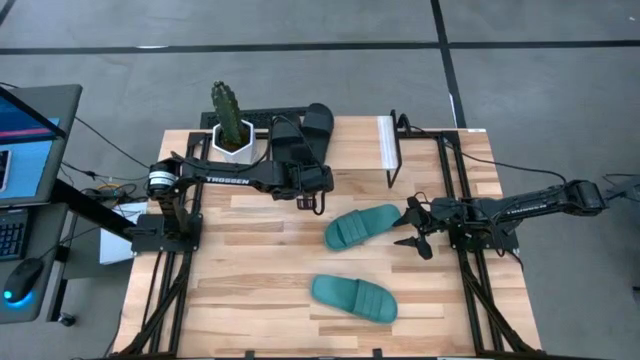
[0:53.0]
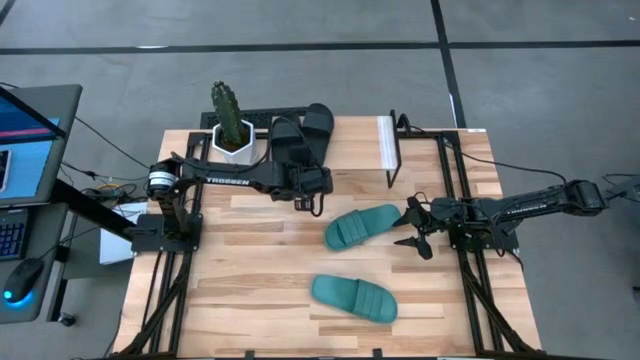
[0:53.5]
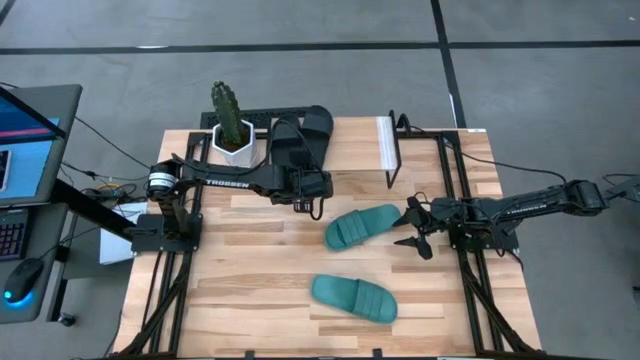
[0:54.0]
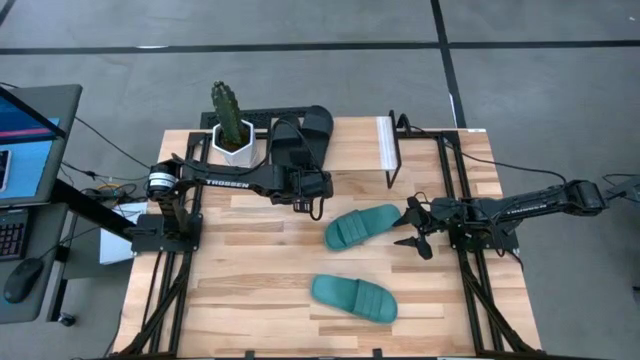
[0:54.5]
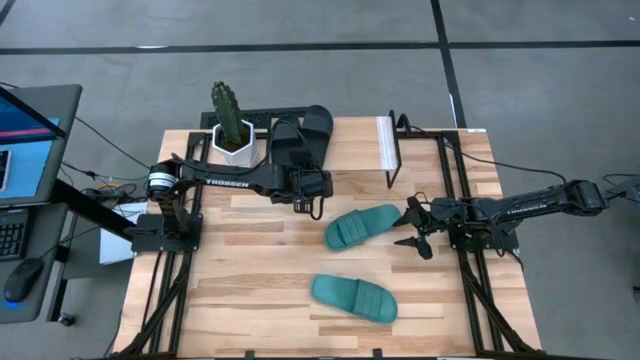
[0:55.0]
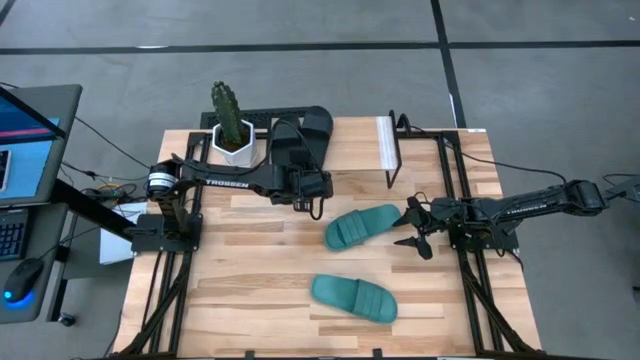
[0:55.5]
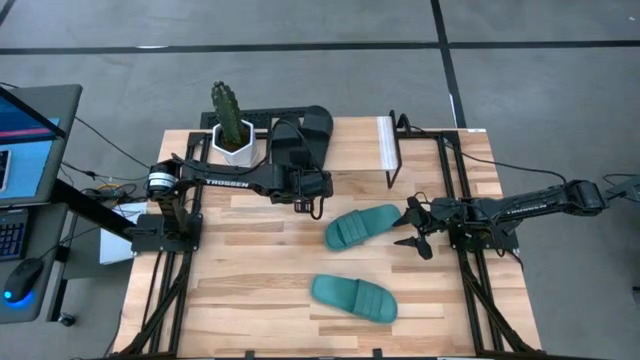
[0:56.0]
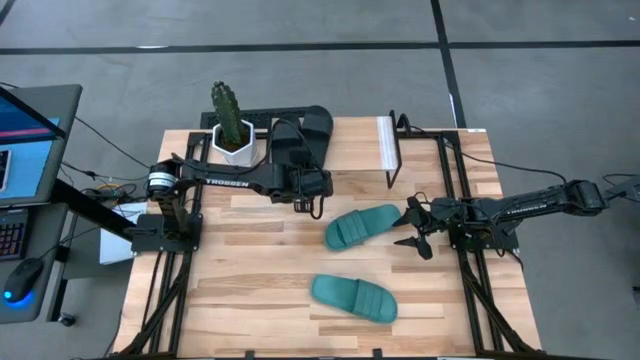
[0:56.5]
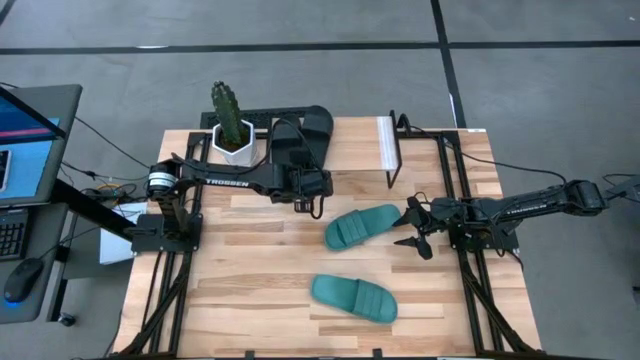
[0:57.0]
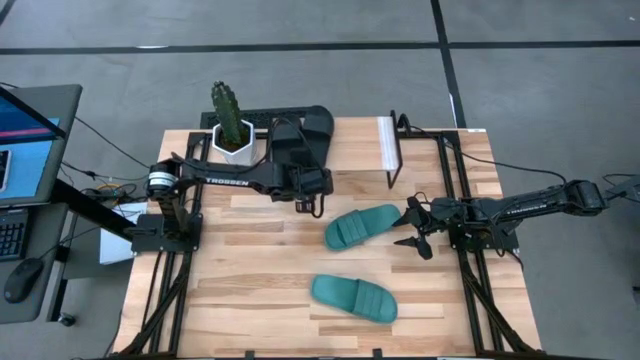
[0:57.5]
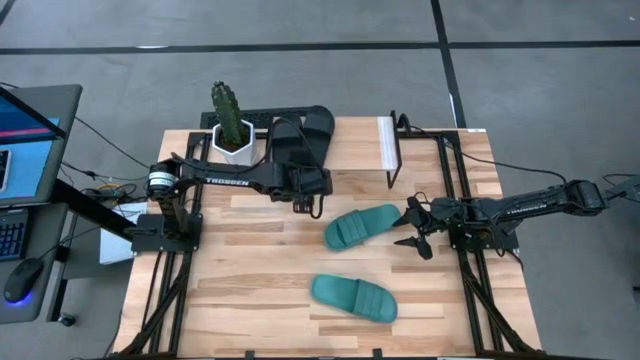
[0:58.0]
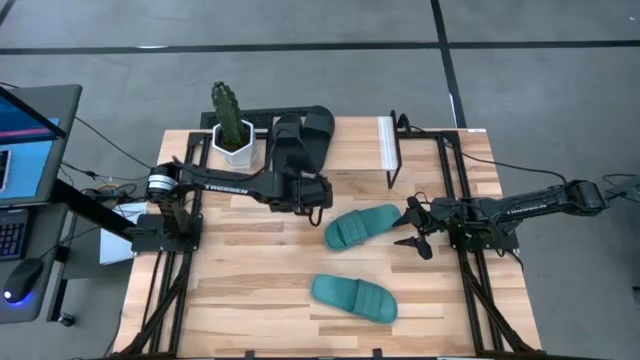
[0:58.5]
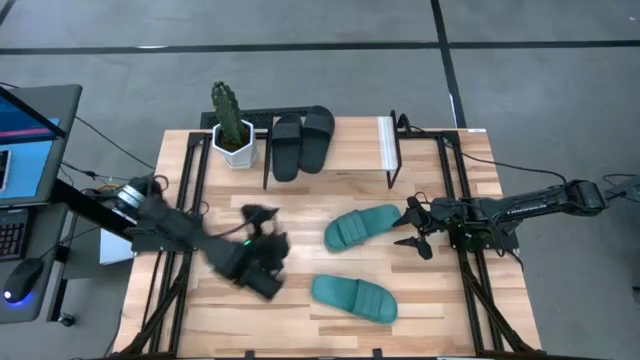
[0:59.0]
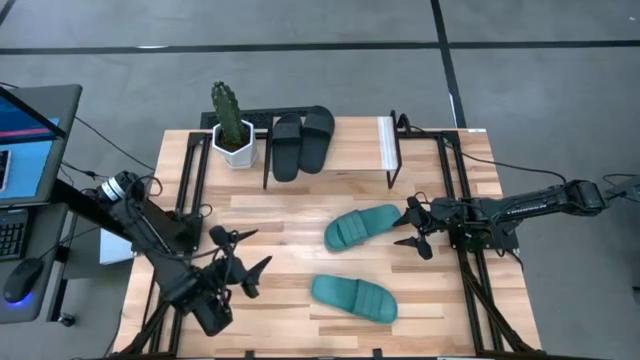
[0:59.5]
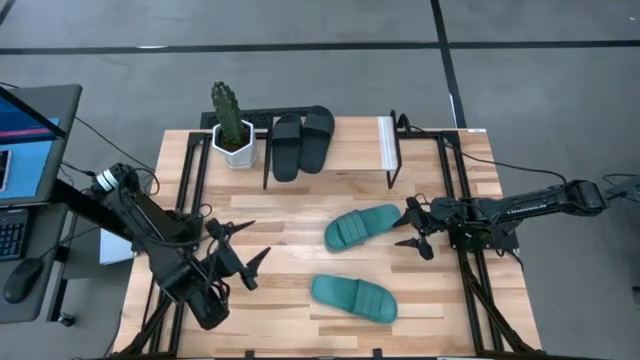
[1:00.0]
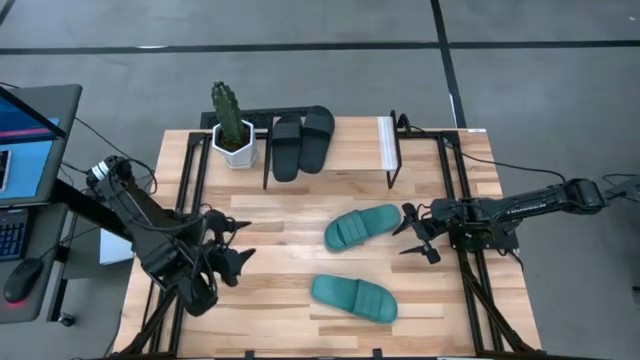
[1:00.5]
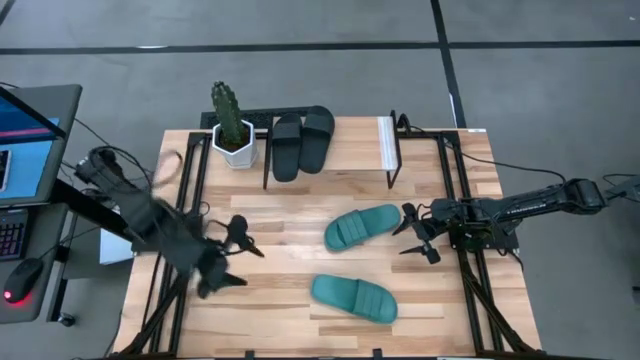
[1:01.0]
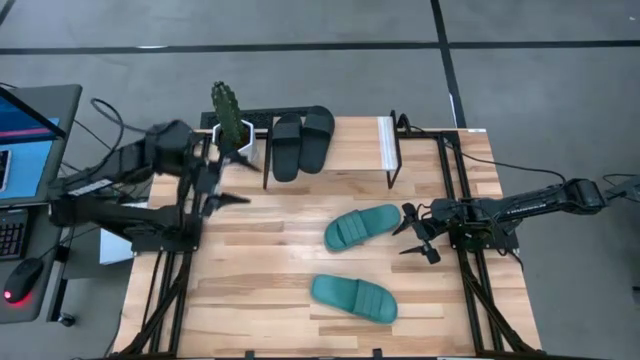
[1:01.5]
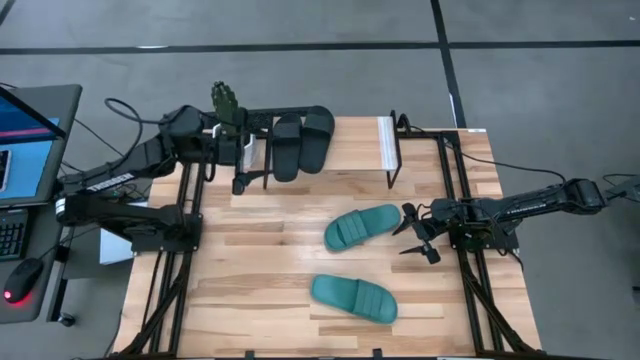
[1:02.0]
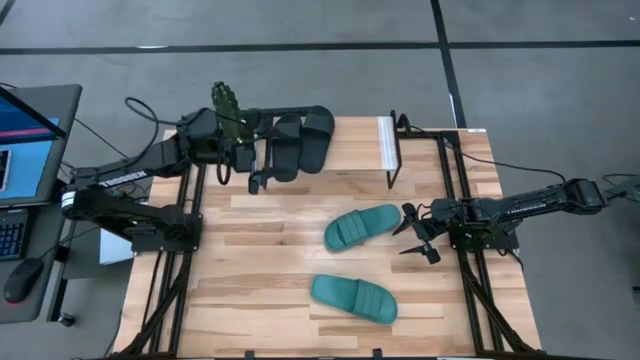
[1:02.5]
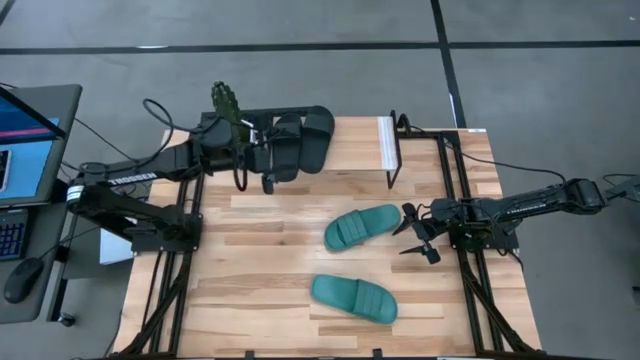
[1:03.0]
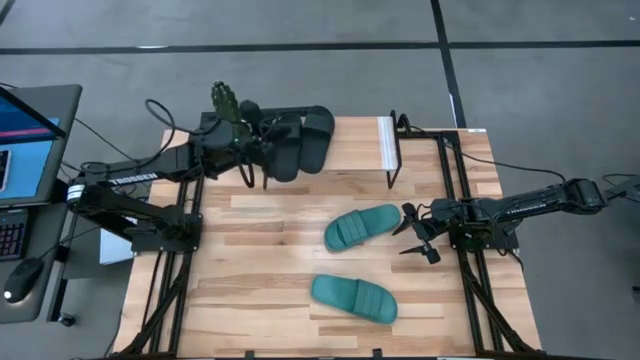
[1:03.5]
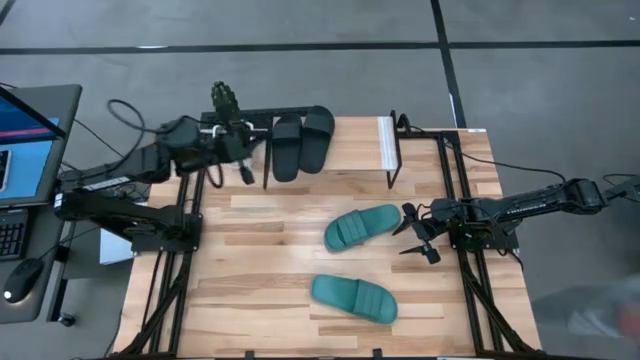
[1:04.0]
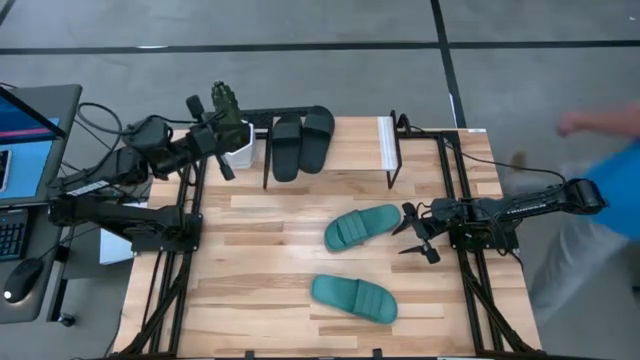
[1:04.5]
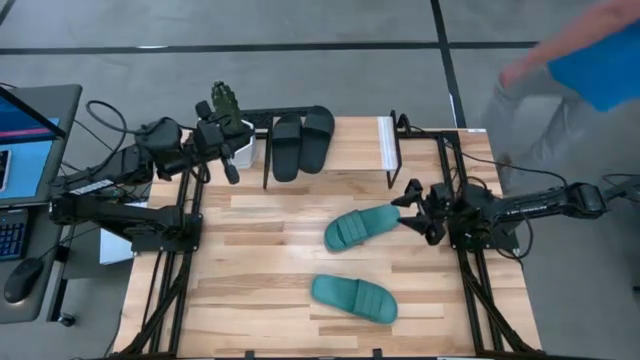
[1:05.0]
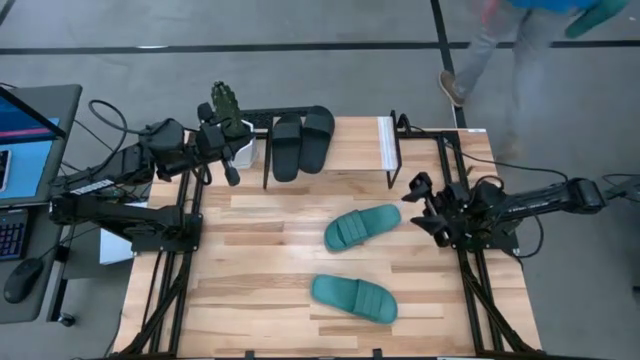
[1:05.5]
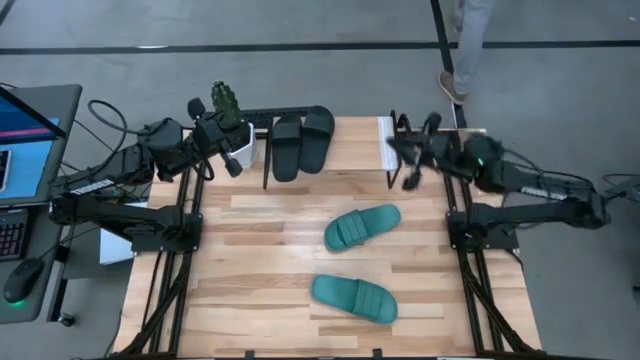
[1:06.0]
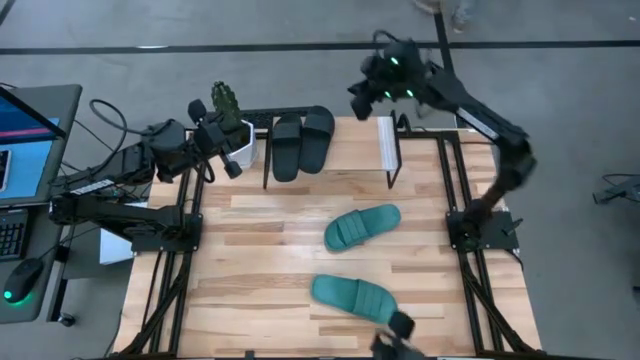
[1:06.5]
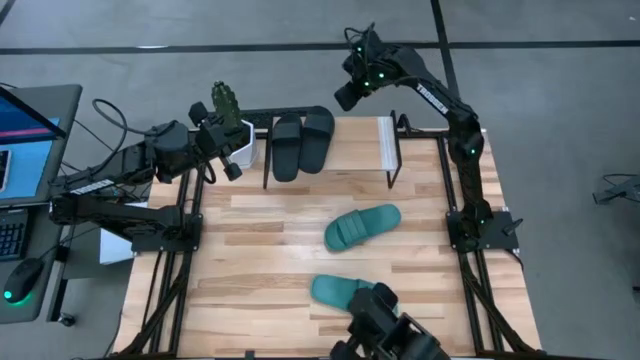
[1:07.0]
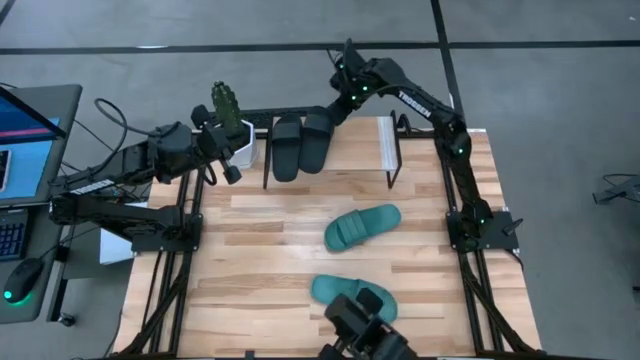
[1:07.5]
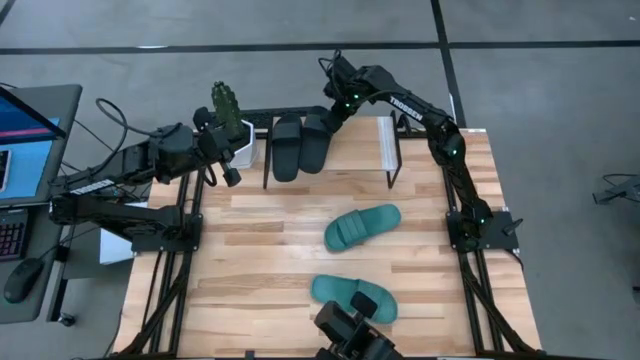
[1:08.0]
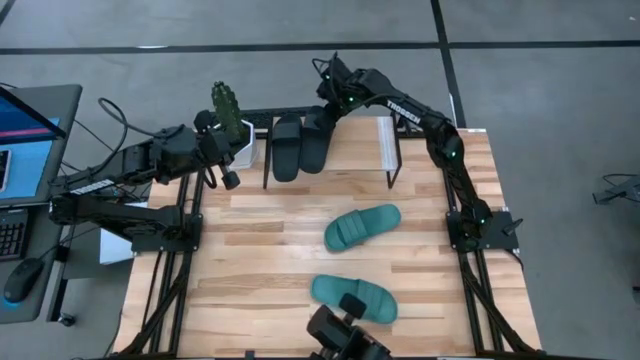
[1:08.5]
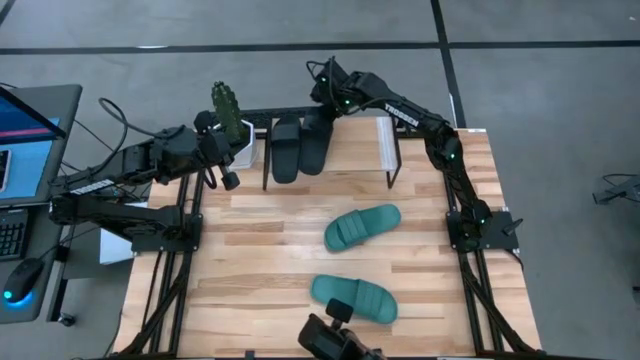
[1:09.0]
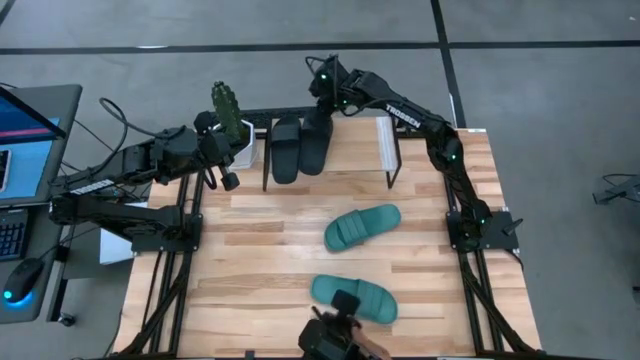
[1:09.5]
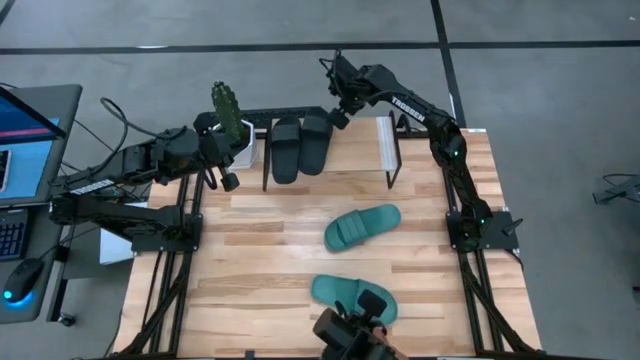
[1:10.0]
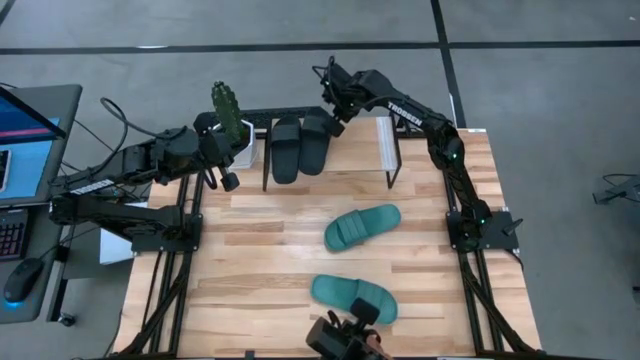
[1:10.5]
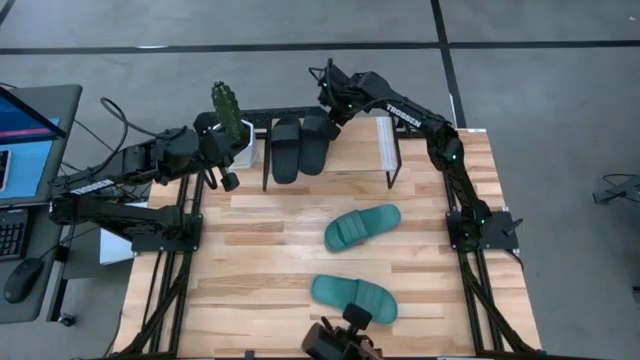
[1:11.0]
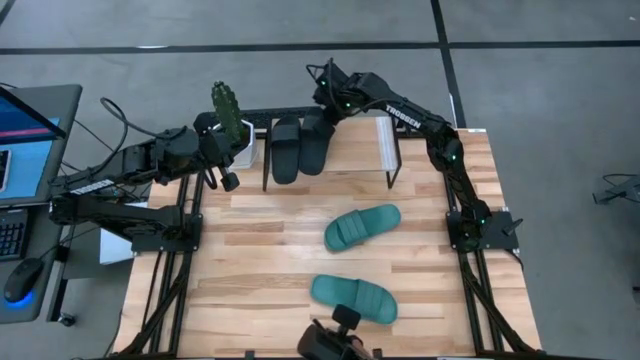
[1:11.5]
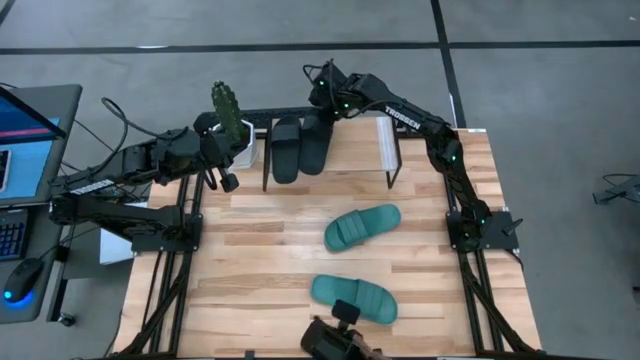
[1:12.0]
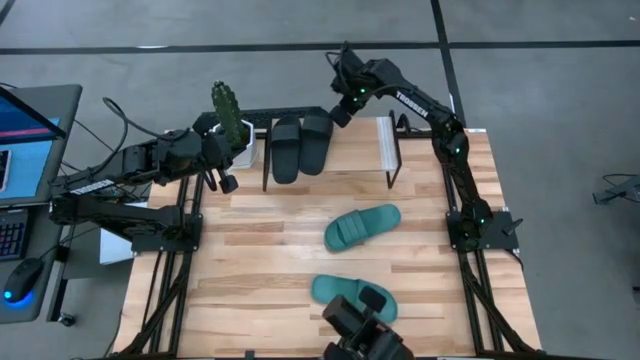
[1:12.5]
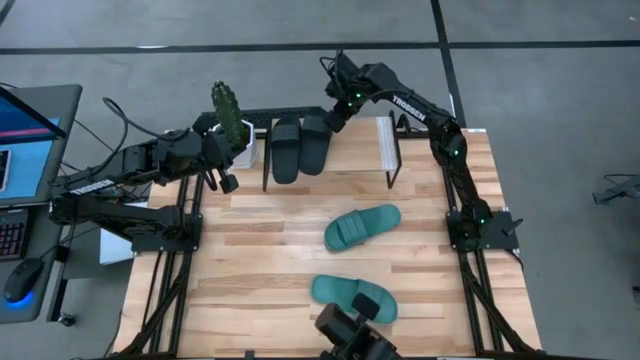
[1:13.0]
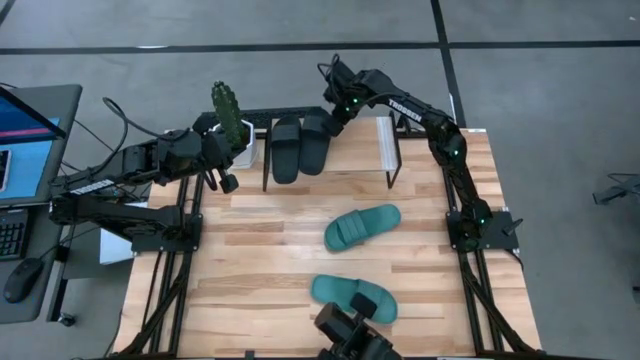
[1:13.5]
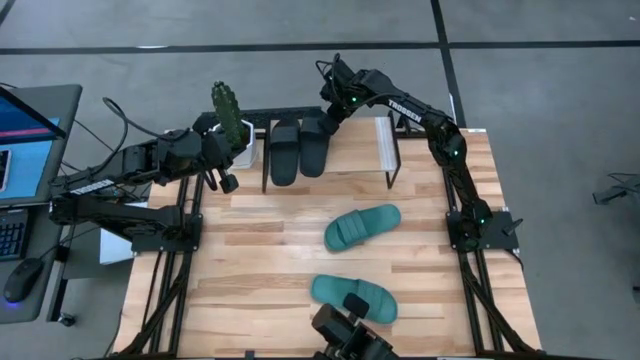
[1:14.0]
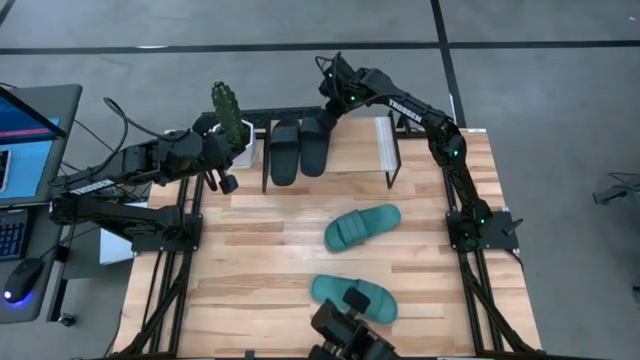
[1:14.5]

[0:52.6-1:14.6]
Task: Pick and place slides into the shelf
Put the black slide on the shelf
